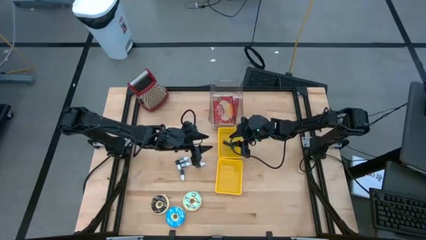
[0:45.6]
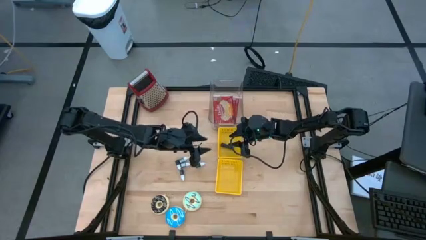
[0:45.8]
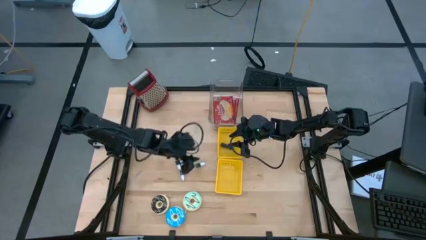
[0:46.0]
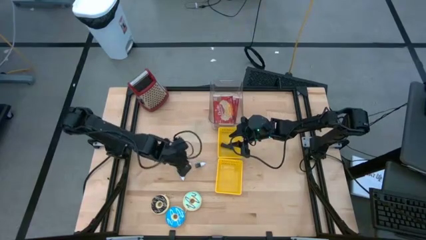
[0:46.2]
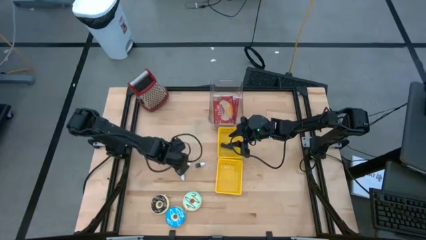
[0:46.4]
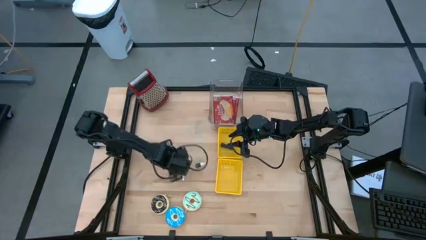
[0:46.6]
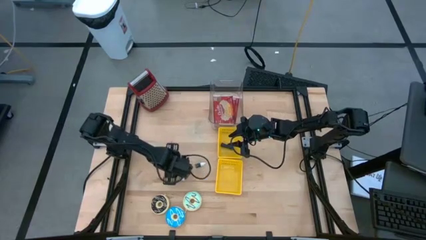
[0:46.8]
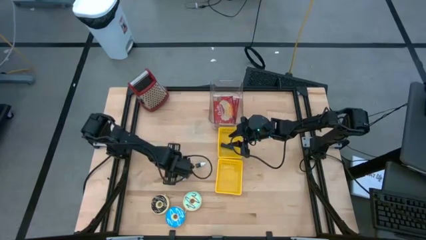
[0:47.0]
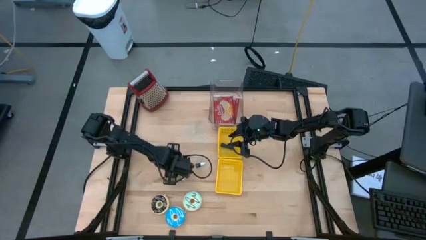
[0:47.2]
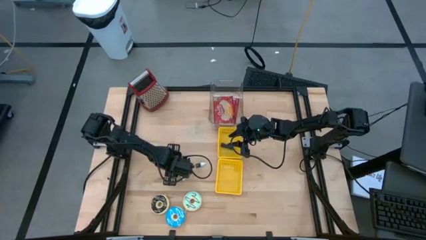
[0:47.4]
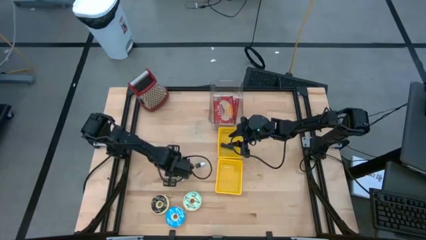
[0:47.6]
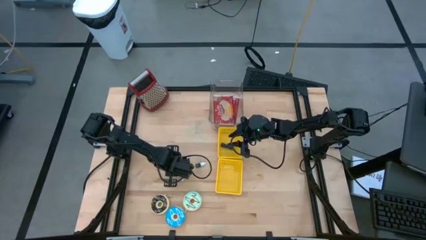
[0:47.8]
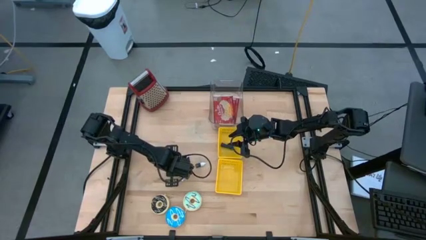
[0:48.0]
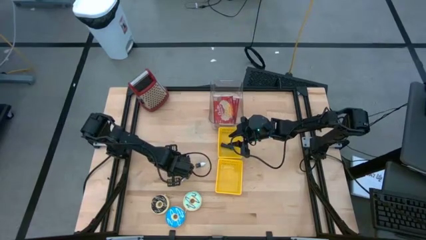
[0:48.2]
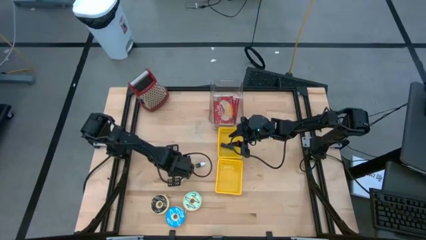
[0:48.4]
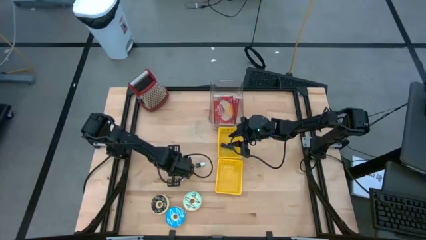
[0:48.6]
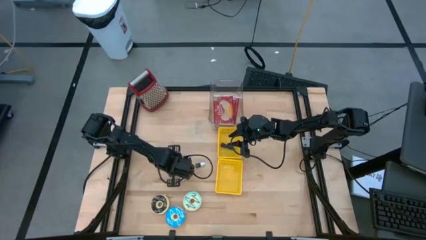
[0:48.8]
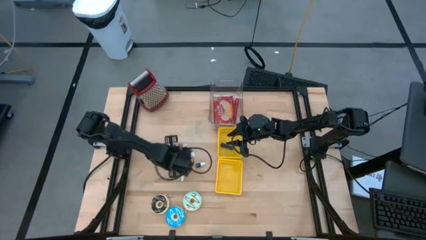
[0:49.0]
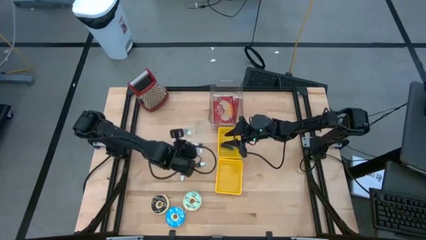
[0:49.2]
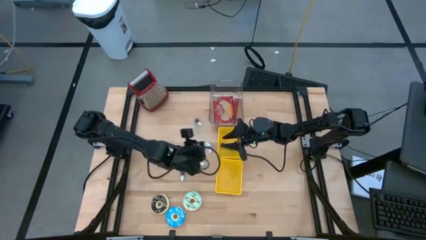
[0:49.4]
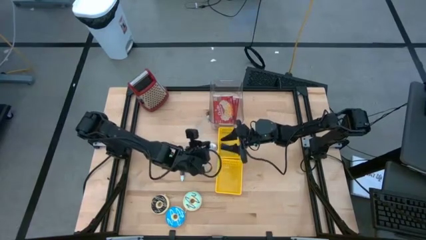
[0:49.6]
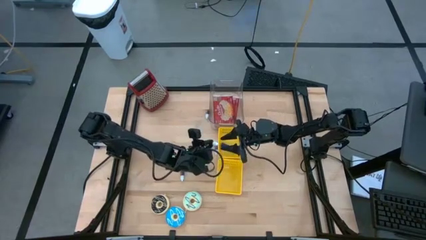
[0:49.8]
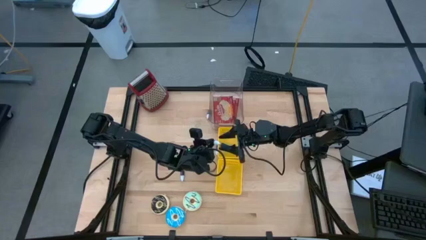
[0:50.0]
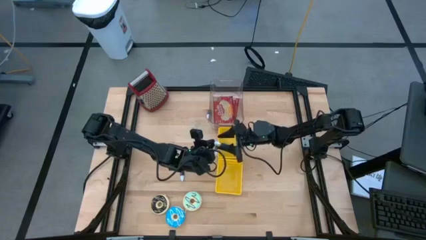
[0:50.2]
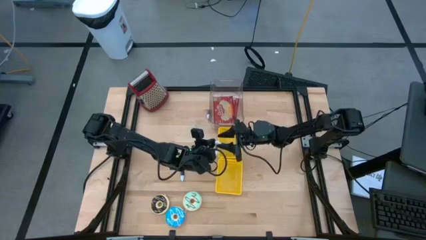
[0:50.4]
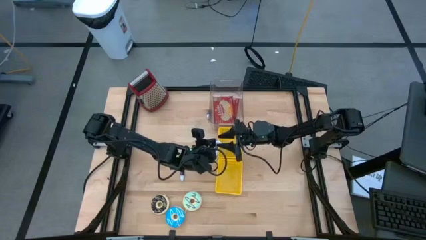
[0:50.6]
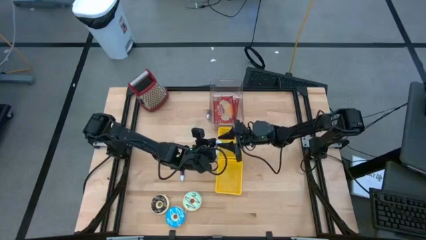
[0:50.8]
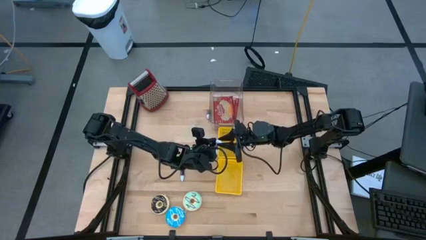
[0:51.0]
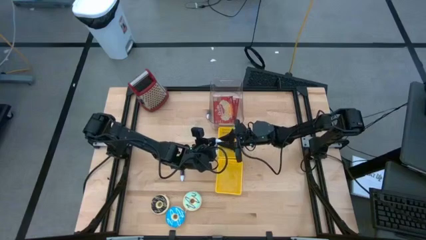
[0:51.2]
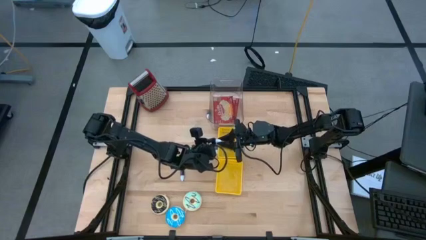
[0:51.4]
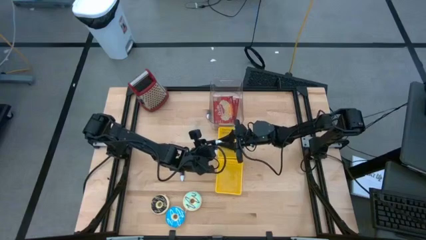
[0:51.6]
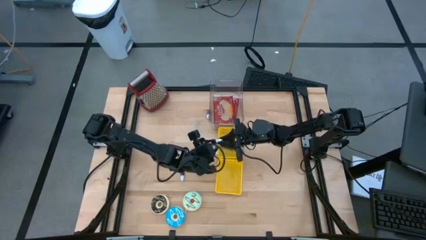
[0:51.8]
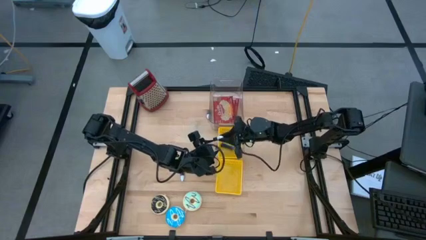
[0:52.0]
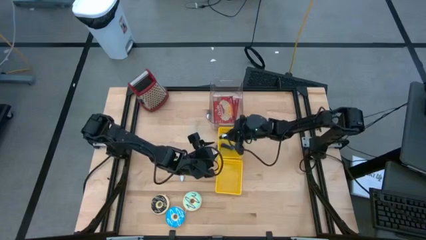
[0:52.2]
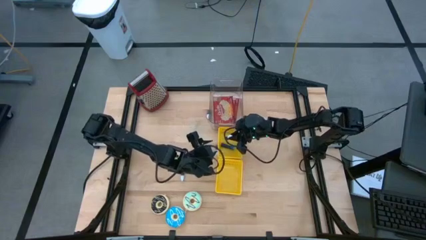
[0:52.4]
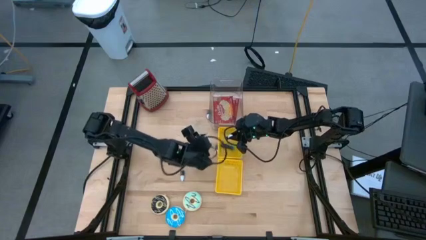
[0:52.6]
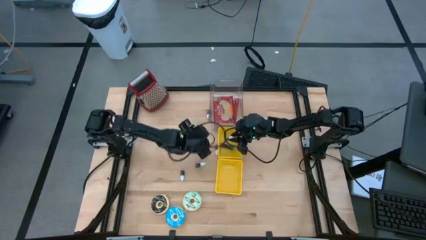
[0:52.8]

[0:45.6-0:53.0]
Put the black food coloring bottle into the top yellow bin

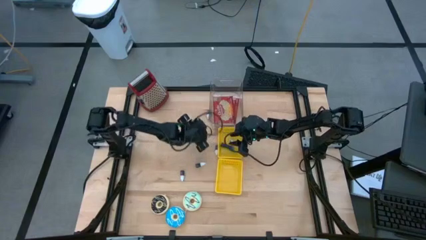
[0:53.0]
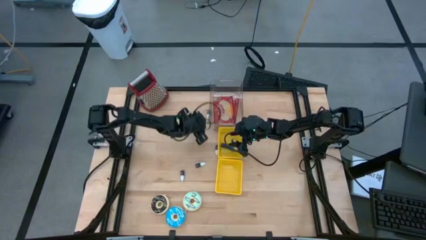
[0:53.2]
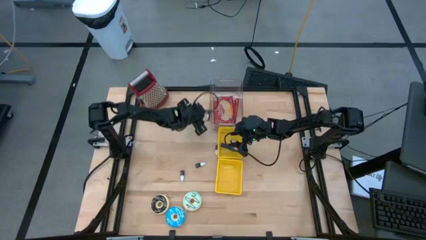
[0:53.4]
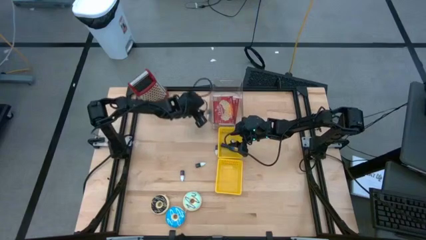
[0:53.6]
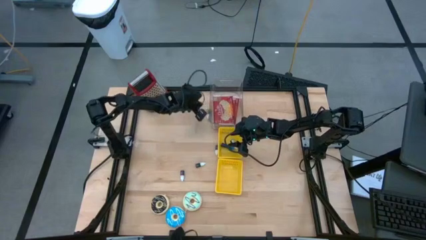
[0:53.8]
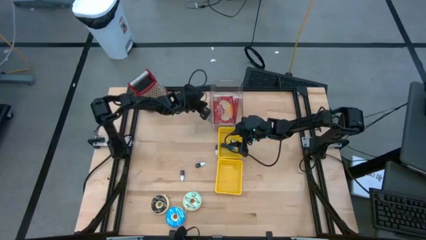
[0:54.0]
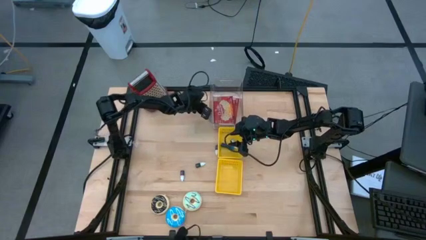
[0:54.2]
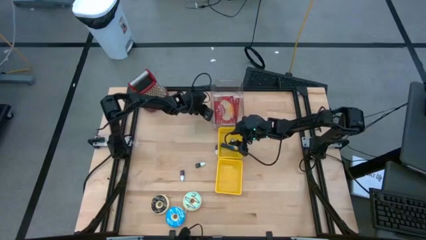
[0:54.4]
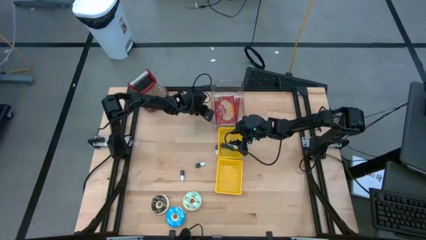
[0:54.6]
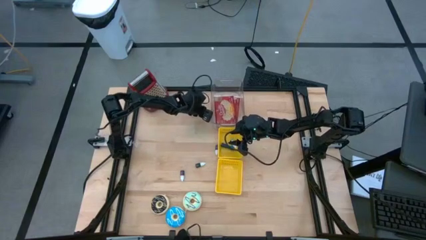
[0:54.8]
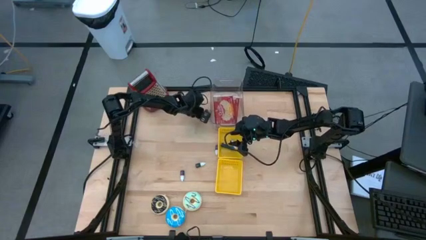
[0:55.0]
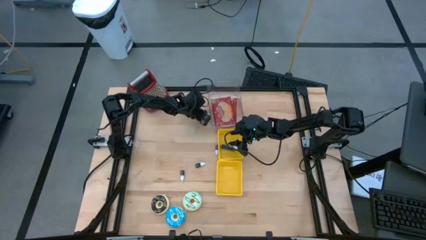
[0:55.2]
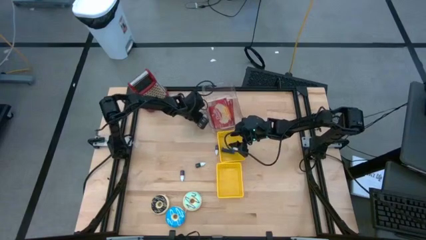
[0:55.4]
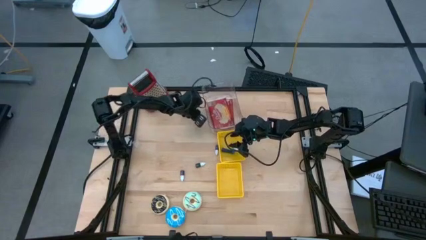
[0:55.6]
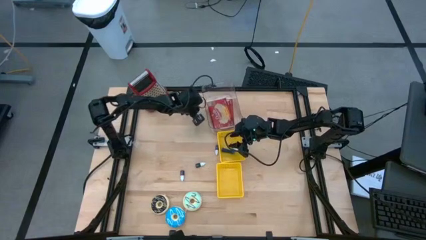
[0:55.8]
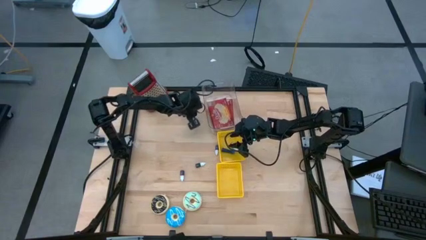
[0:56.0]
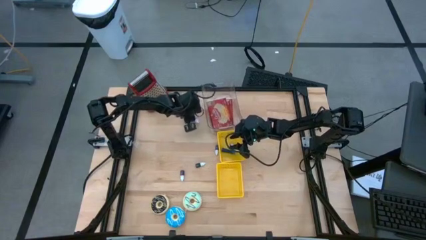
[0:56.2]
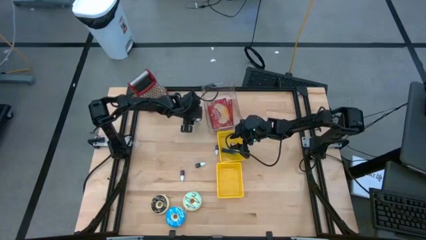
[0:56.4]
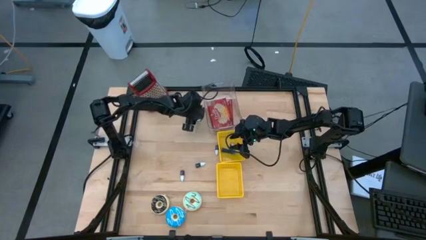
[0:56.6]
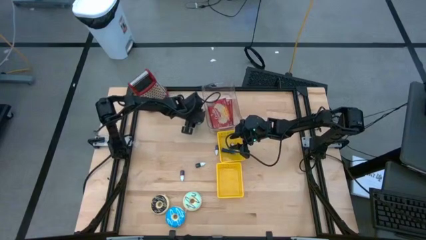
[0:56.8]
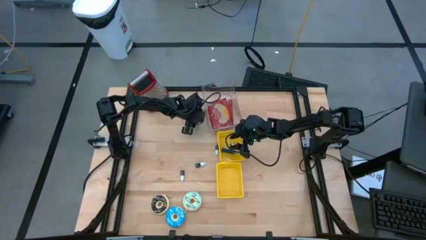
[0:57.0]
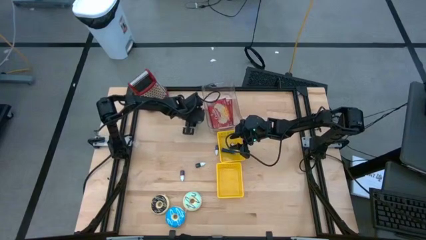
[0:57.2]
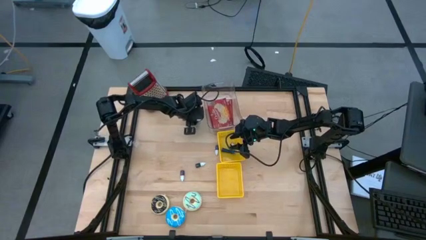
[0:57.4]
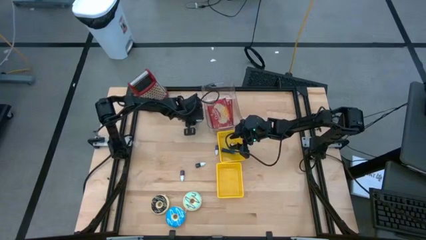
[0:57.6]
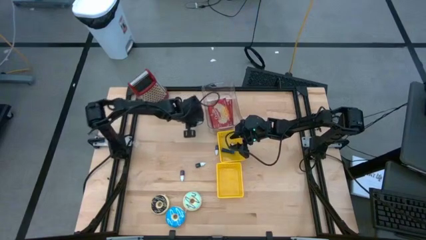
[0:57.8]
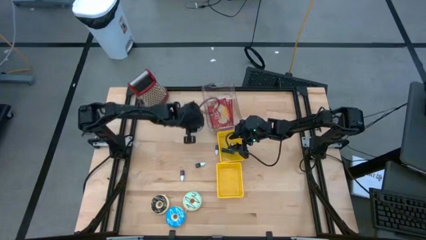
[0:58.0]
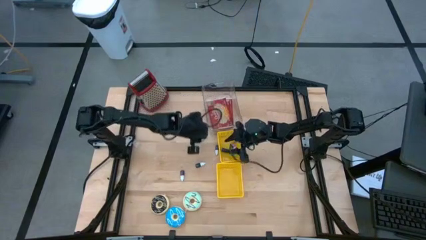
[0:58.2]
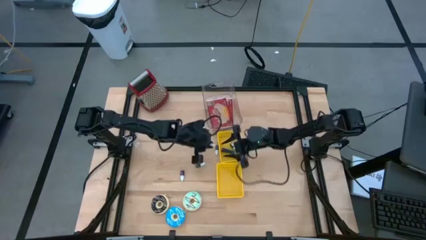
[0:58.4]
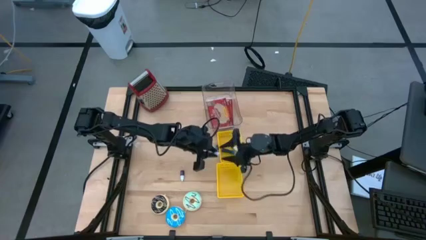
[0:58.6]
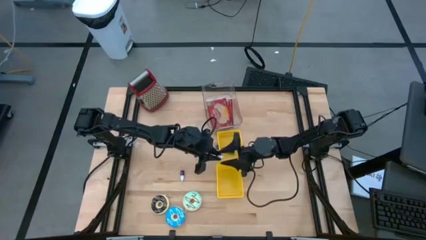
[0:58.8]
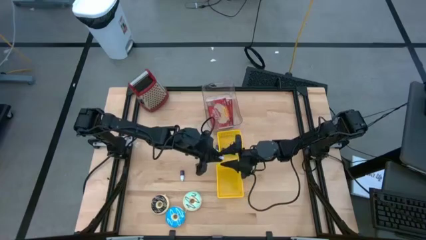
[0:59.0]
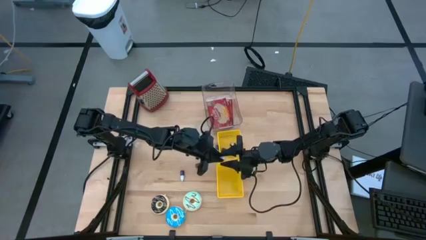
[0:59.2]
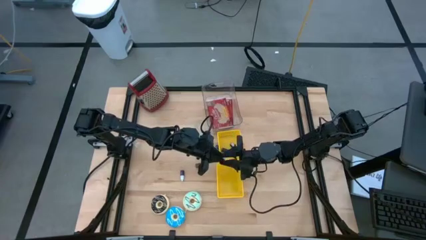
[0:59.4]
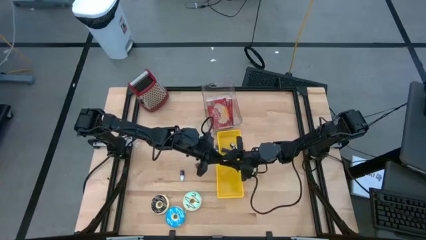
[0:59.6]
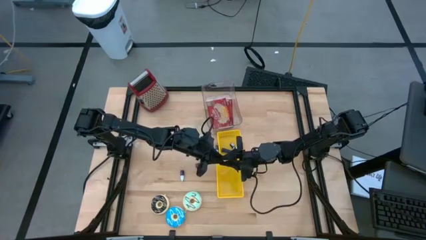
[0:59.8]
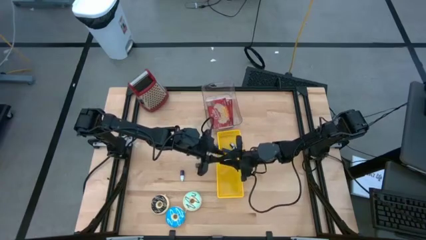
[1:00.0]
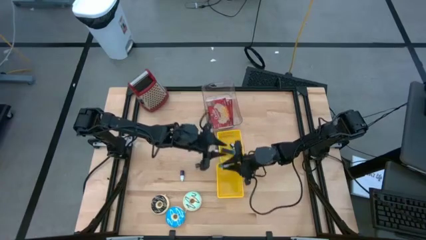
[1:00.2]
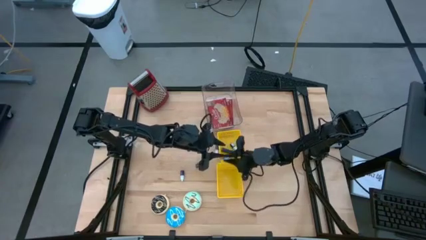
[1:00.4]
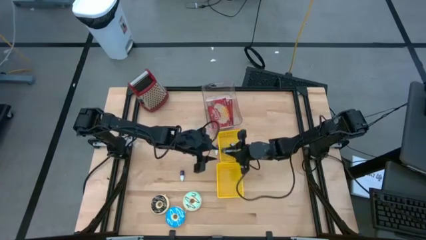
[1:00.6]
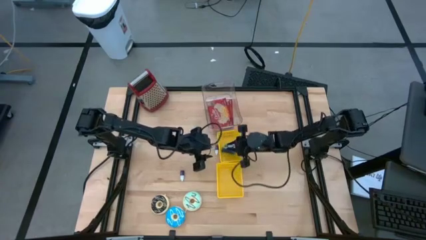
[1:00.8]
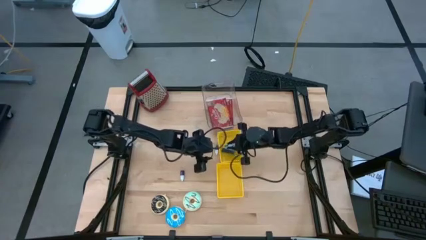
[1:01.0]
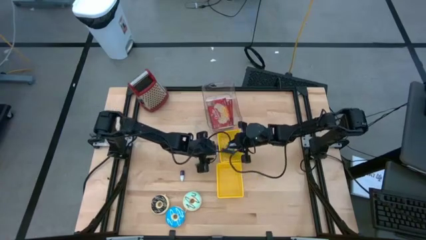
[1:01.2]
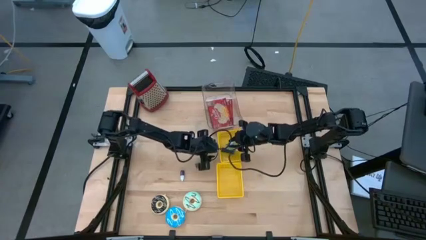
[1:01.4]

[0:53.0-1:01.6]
Put the green food coloring bottle into the top yellow bin

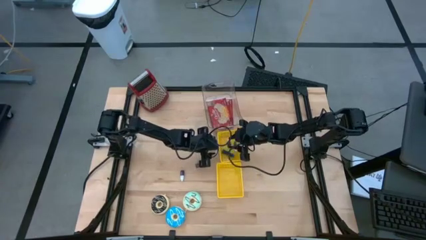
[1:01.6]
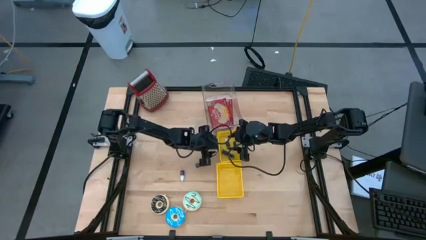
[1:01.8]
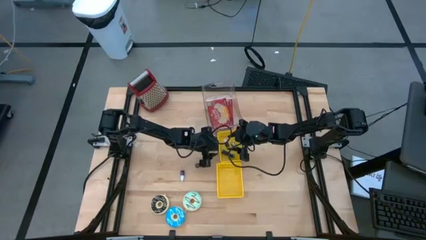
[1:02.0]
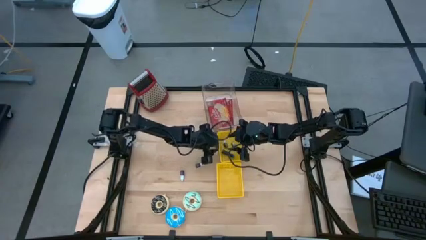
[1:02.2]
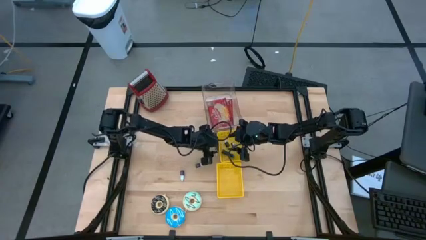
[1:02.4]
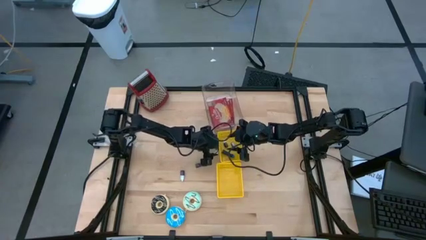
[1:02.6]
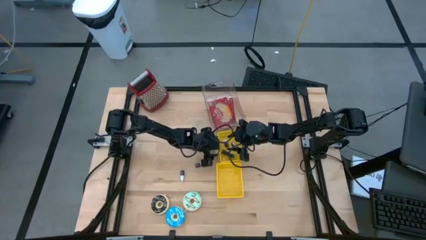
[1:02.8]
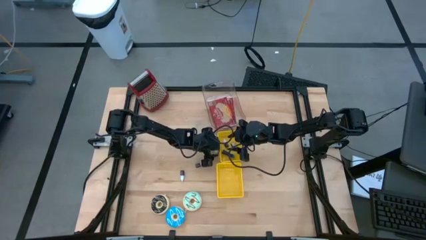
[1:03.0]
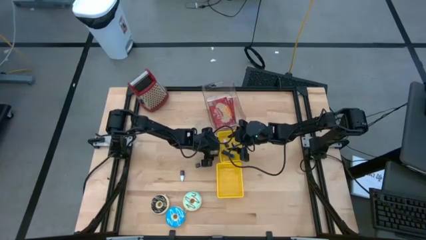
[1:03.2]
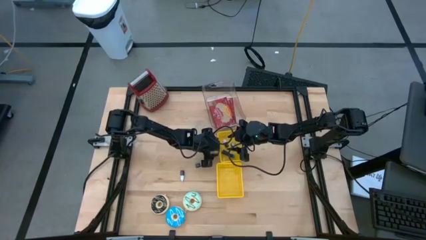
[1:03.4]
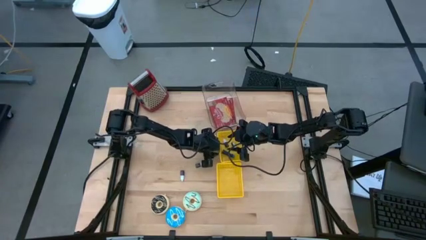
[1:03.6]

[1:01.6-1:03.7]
Put the blue food coloring bottle into the top yellow bin
